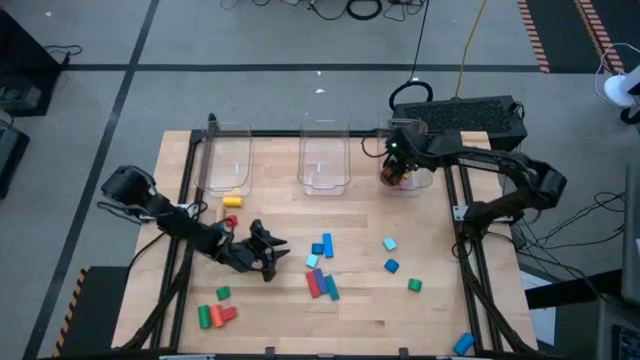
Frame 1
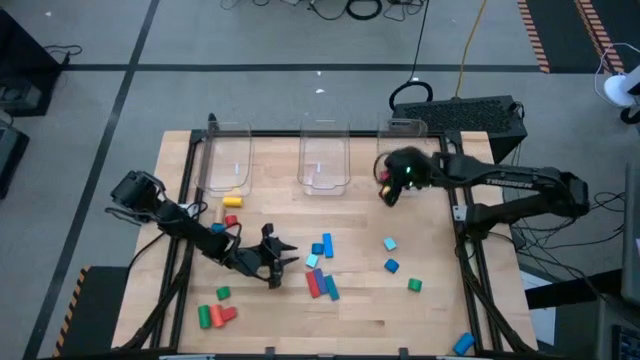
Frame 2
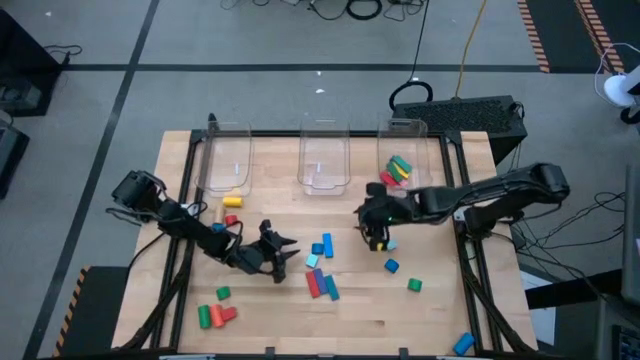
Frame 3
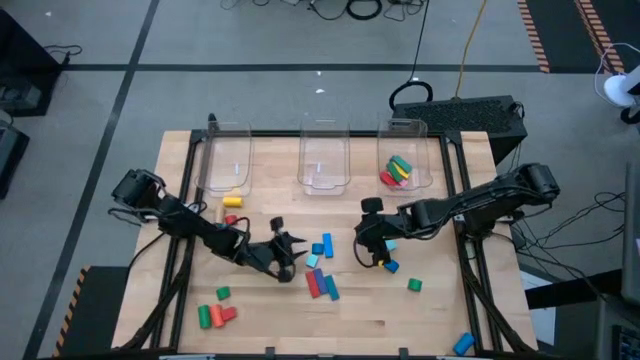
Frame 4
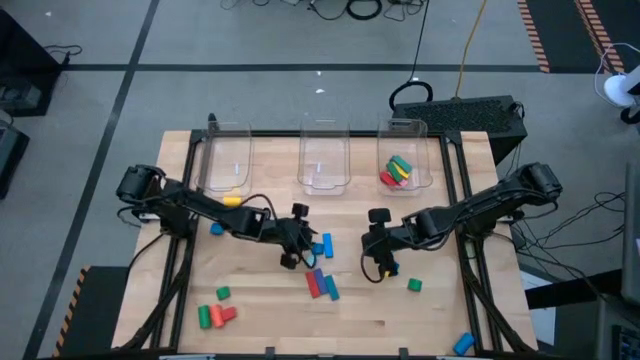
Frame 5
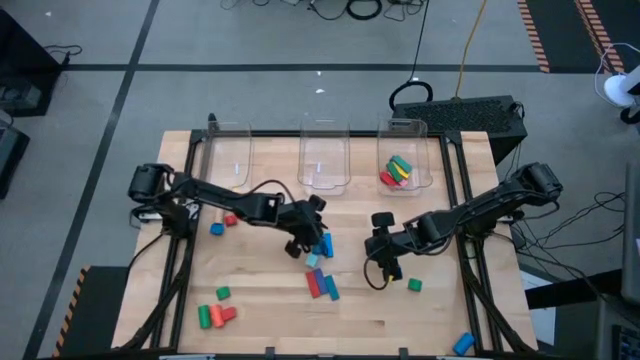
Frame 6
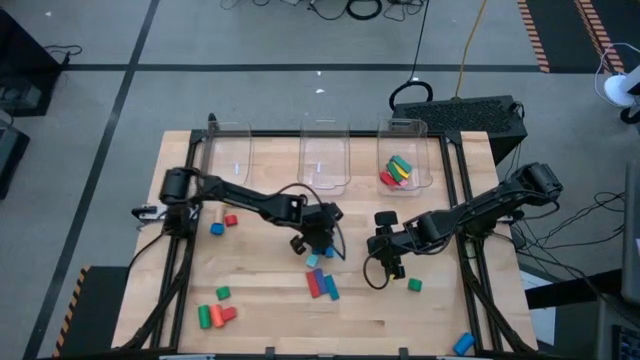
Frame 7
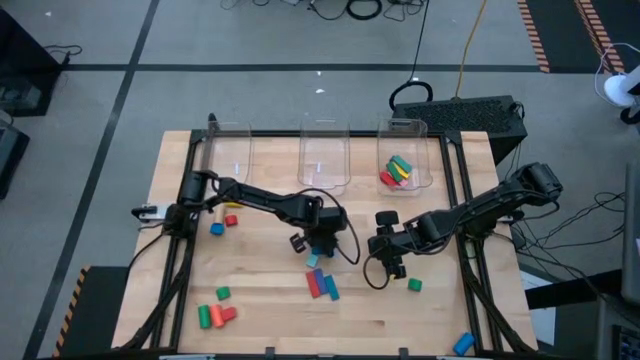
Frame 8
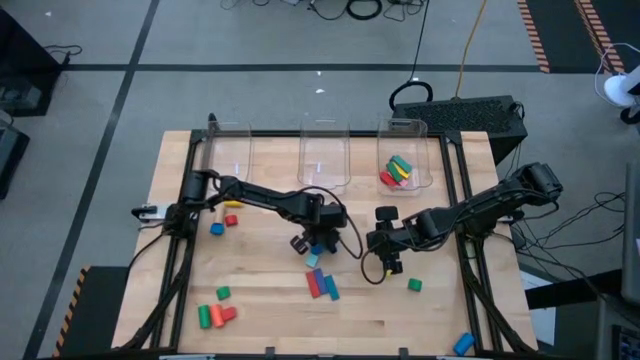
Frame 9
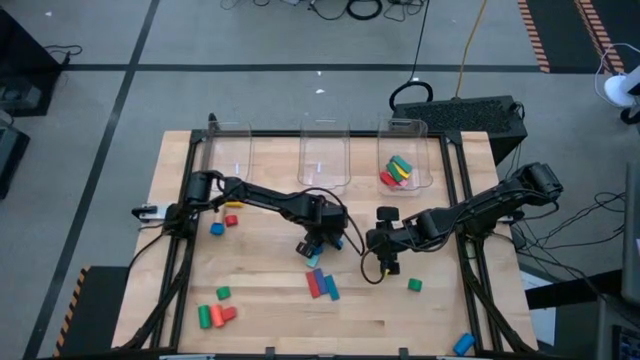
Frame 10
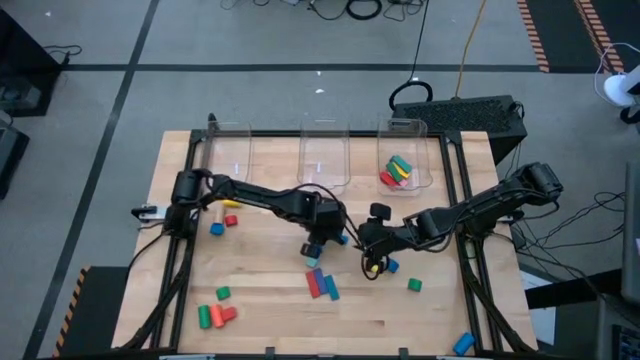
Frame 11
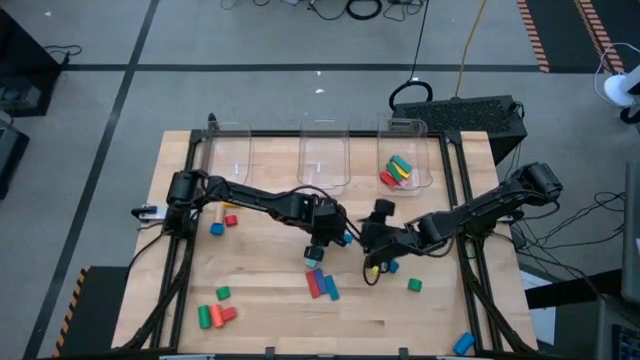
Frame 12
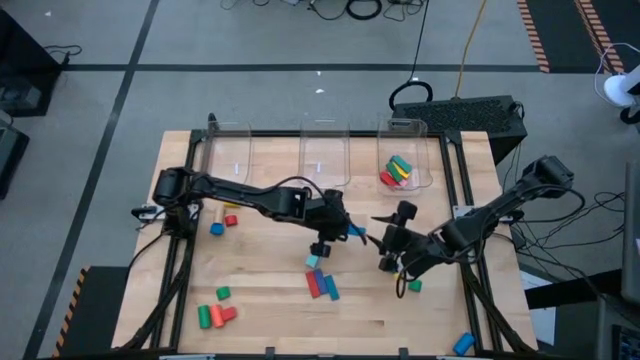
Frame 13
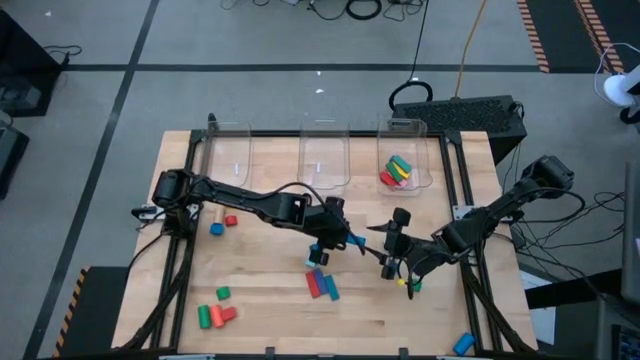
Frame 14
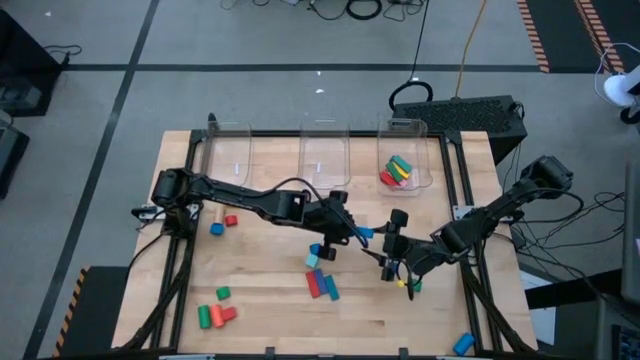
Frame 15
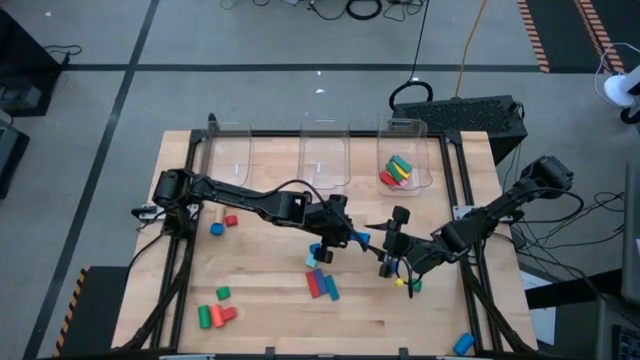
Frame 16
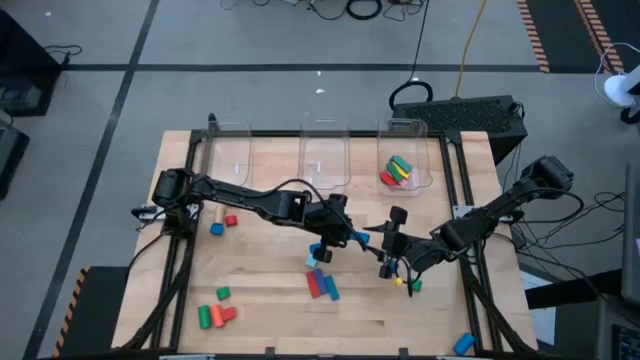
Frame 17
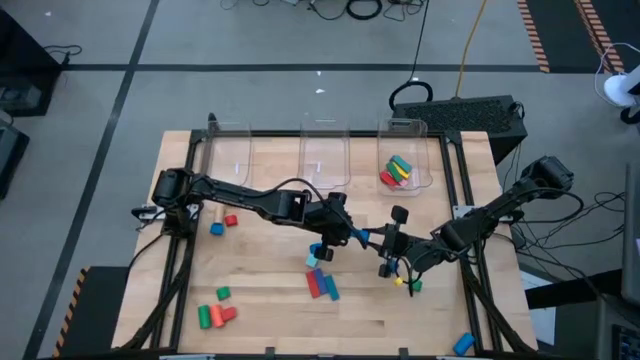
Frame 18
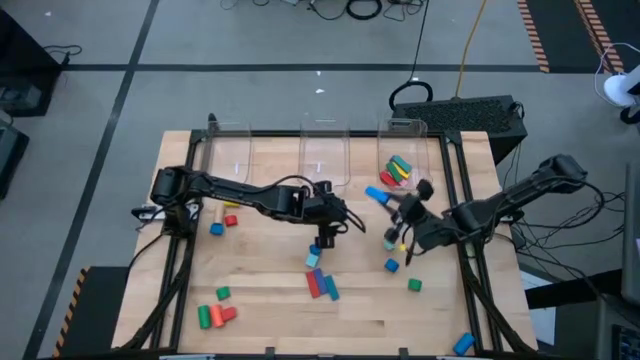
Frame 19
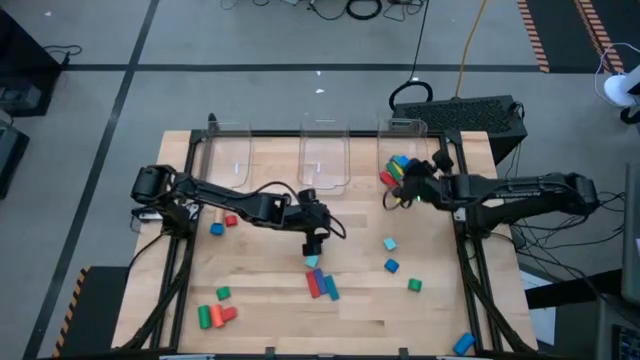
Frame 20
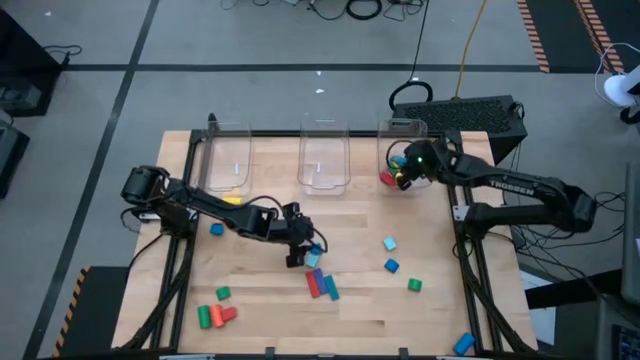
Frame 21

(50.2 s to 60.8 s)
Task: Sort blocks by size
Put the blue rectangular block into the right transparent bin

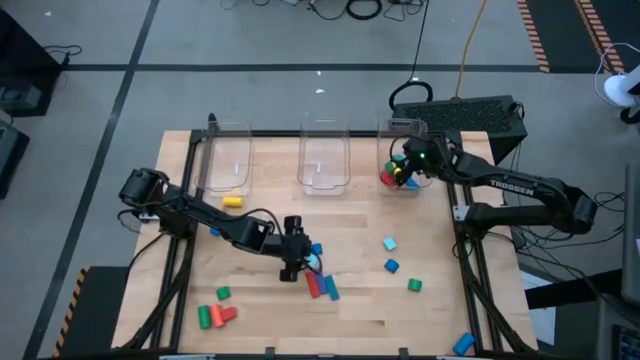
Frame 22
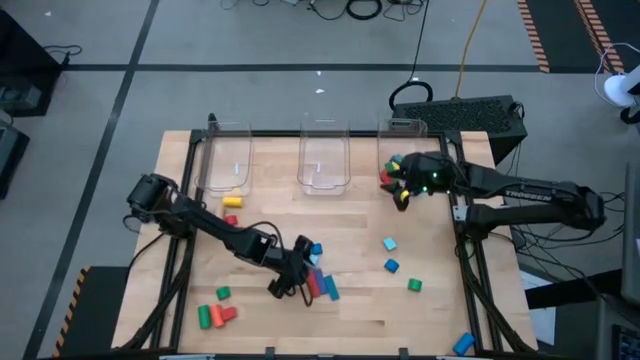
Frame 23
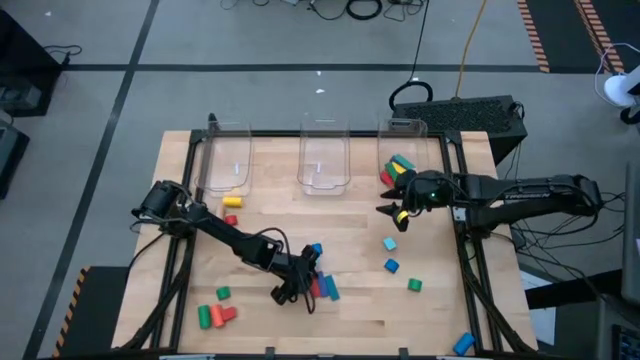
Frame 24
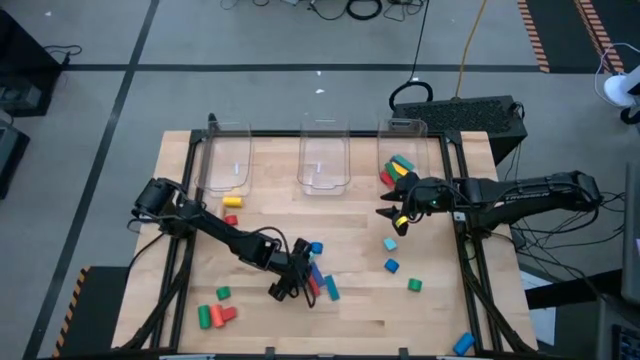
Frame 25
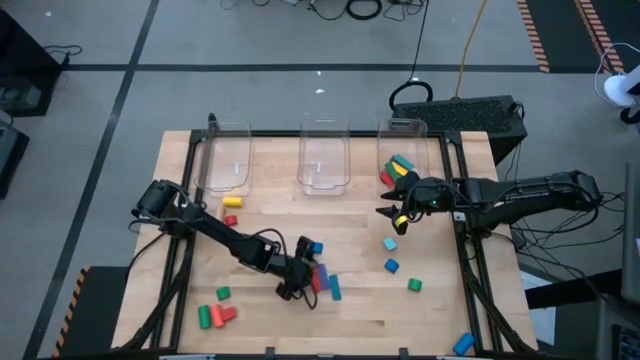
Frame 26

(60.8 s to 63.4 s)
Put the red rectangular block into the right transparent bin

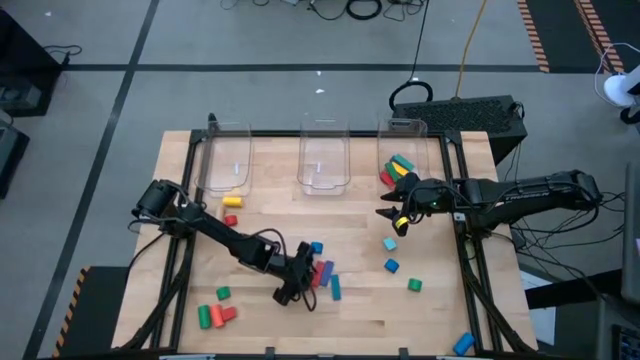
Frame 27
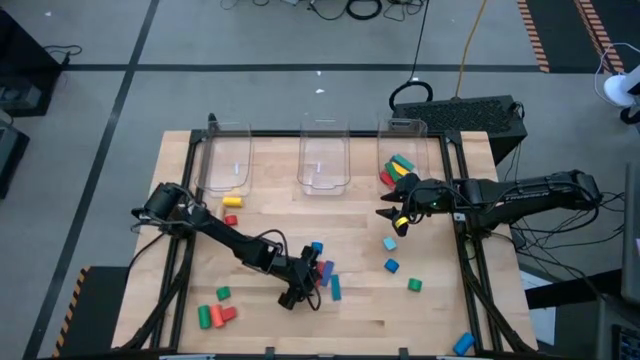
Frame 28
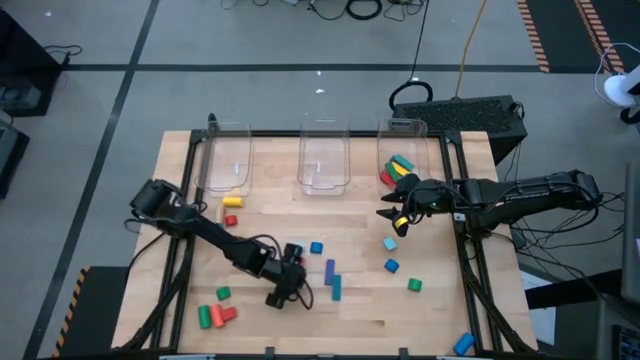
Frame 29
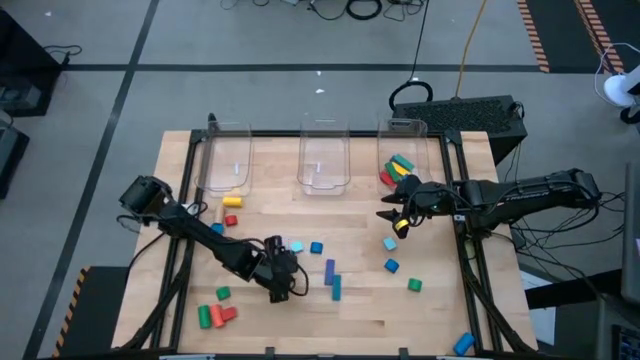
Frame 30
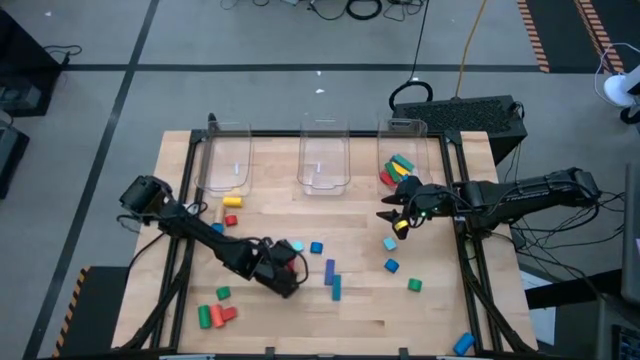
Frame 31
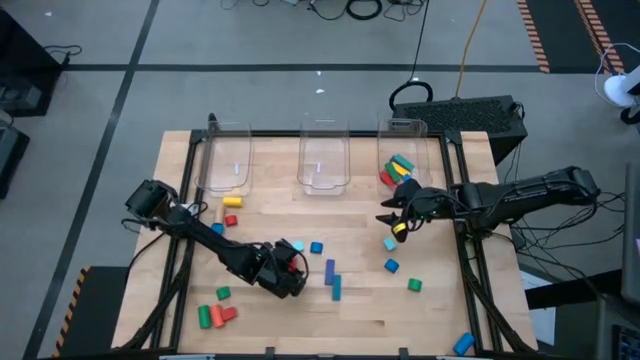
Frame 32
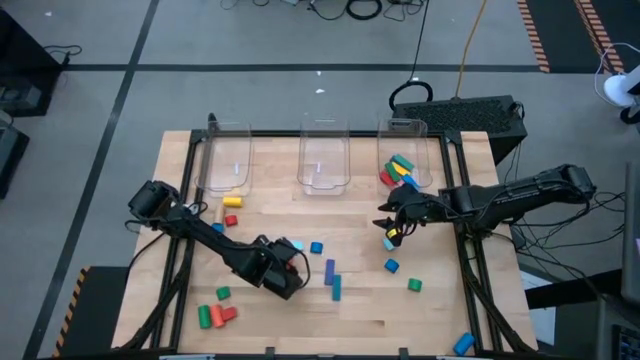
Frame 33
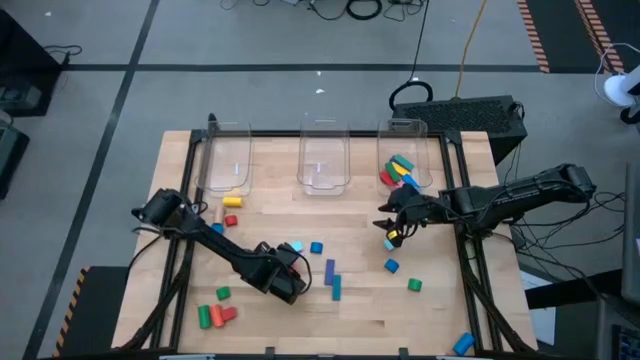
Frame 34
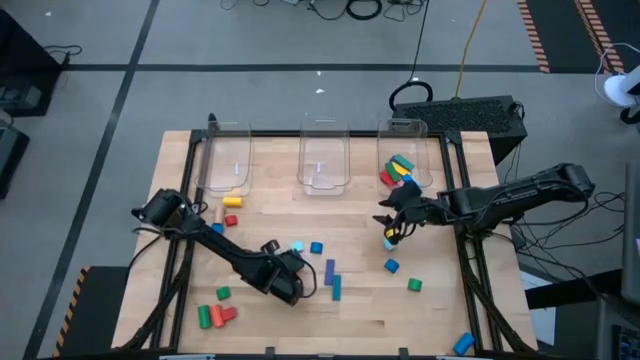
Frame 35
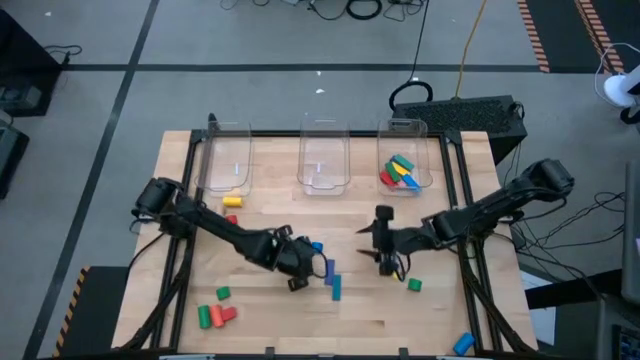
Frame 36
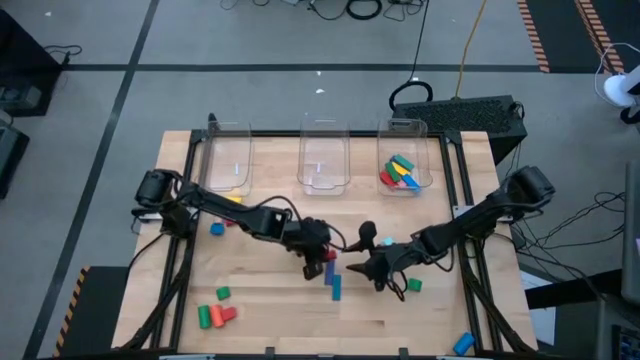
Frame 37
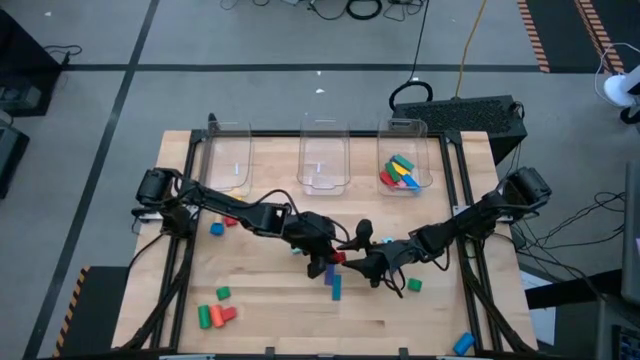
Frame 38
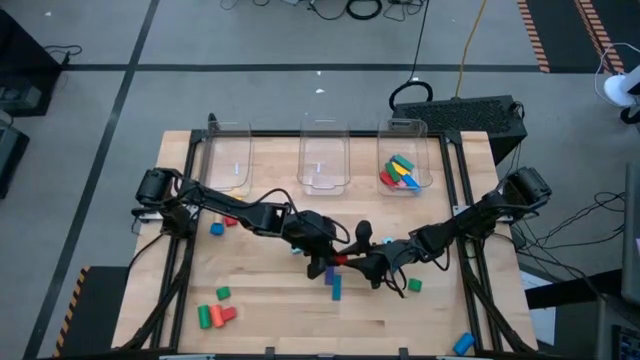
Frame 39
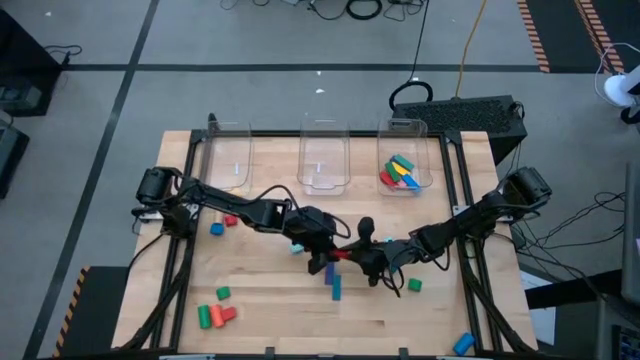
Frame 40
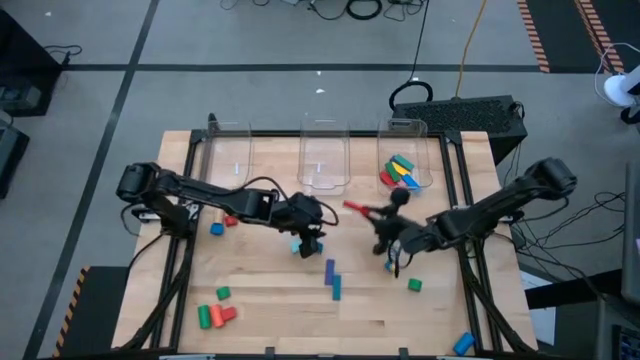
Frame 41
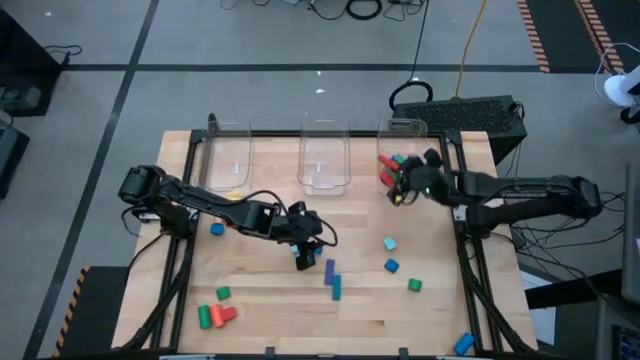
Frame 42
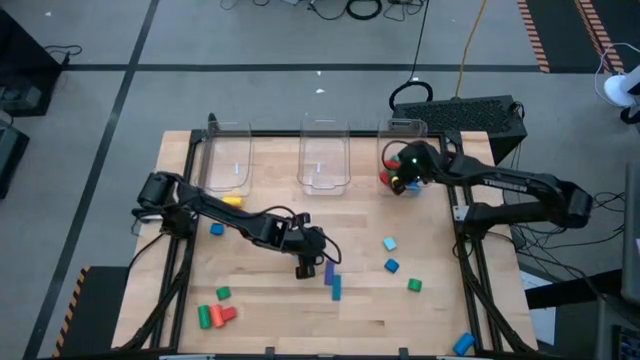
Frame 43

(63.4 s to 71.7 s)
Put the red rectangular block into the right transparent bin
